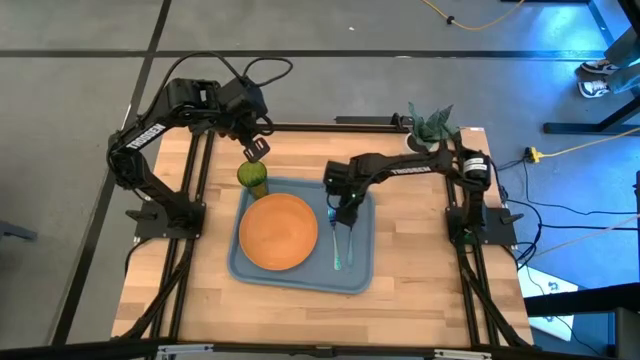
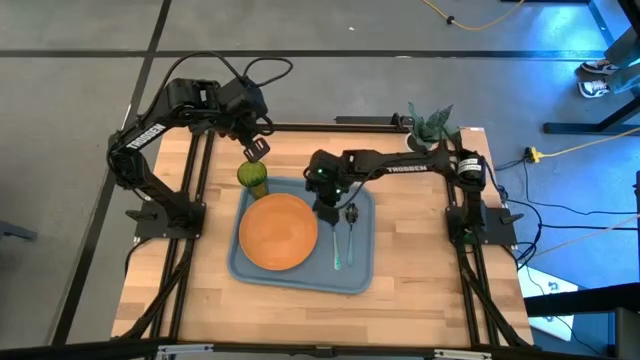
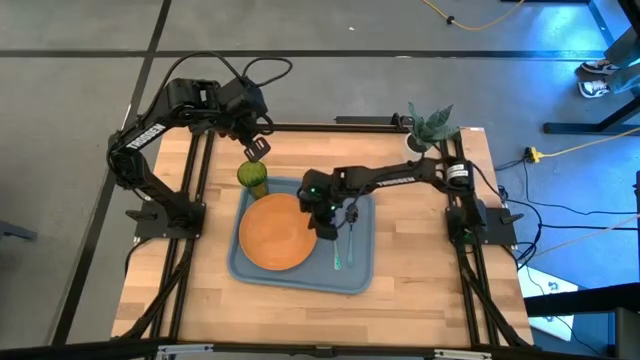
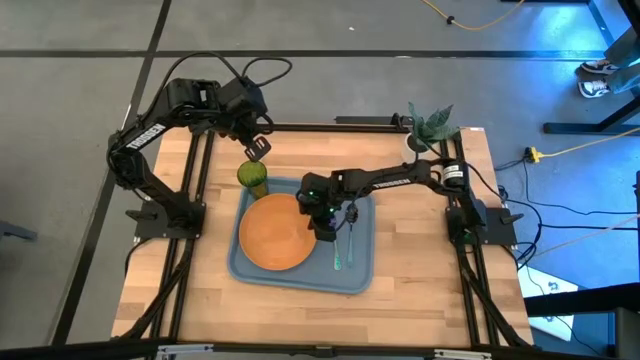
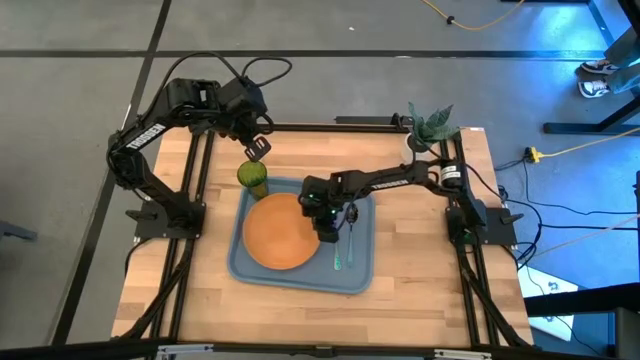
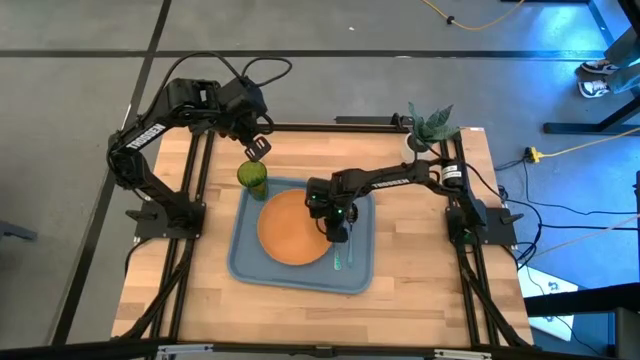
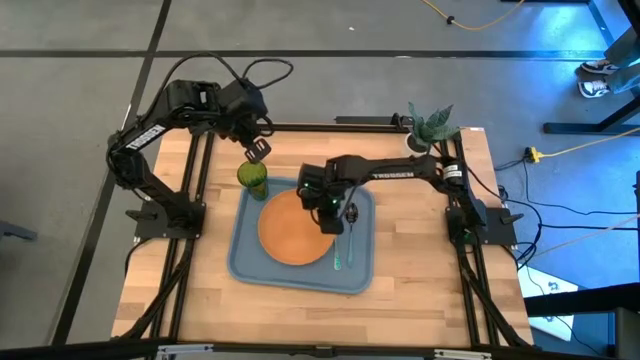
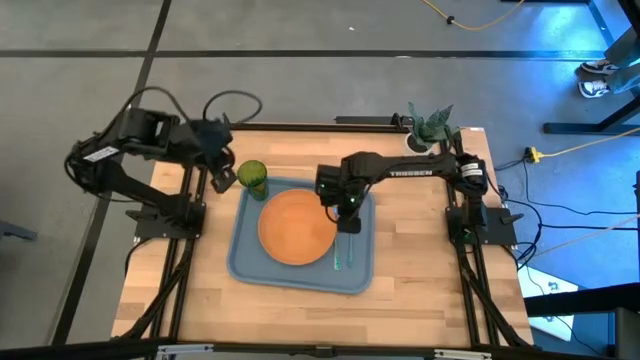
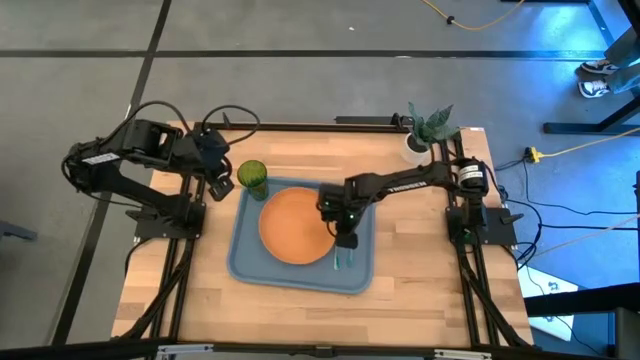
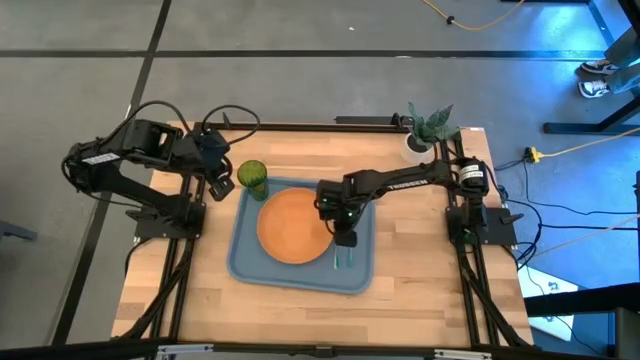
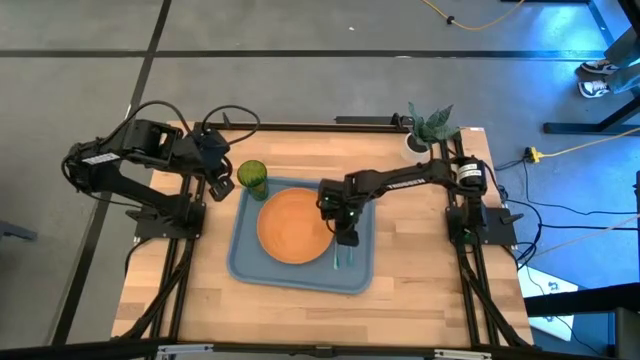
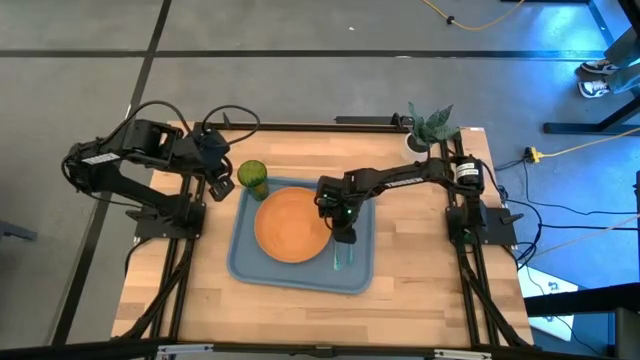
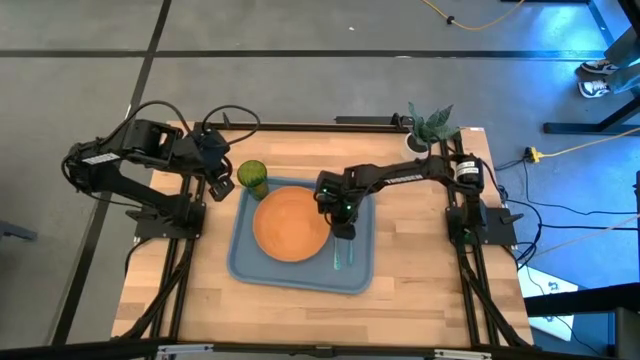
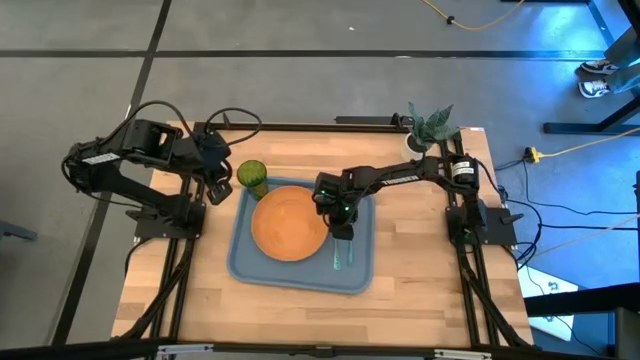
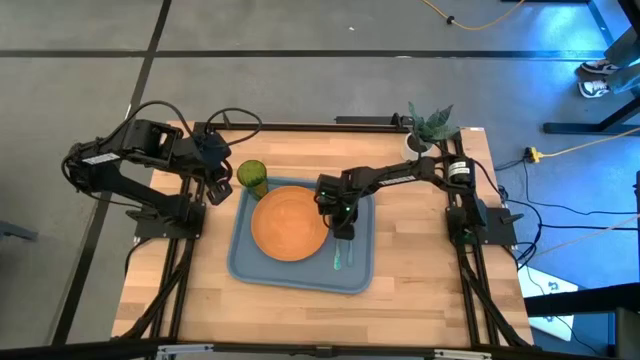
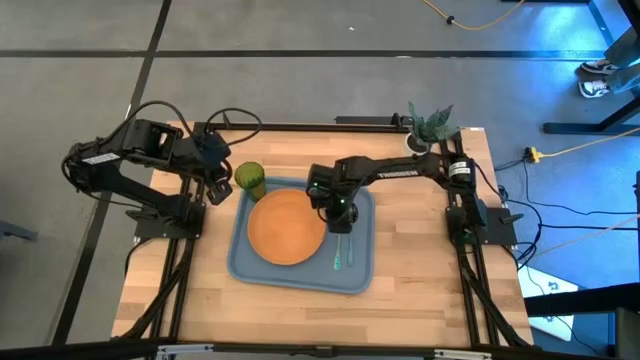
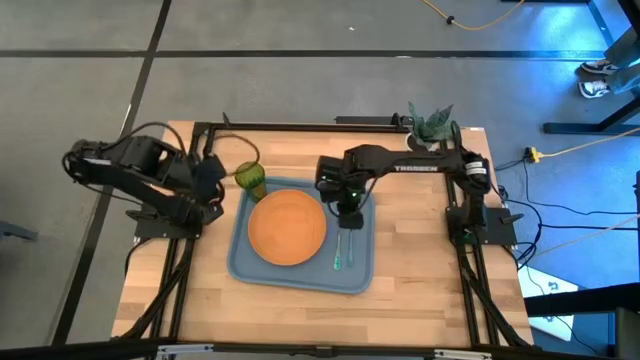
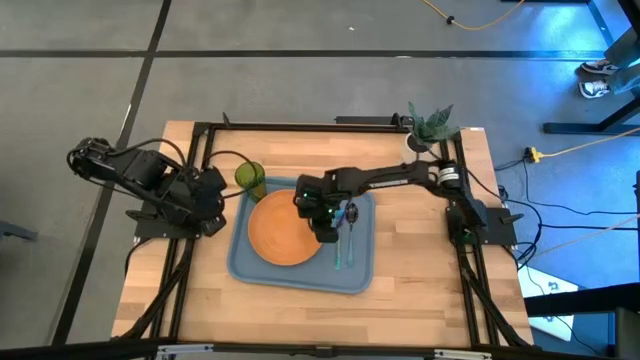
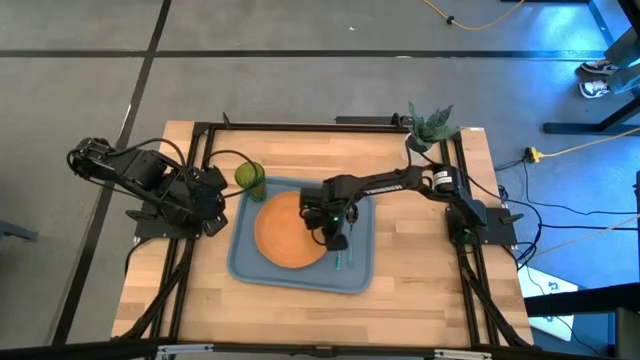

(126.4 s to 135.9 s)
Task: Pick and place plate/cup/fork/spoon on tray
Adjust the orange plate on the blue tray

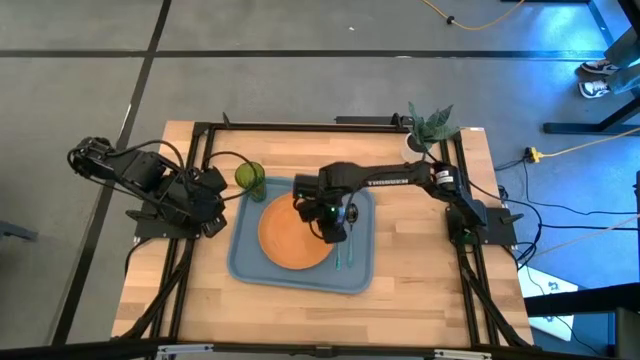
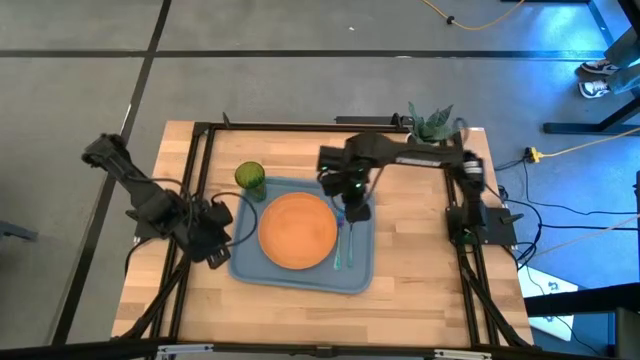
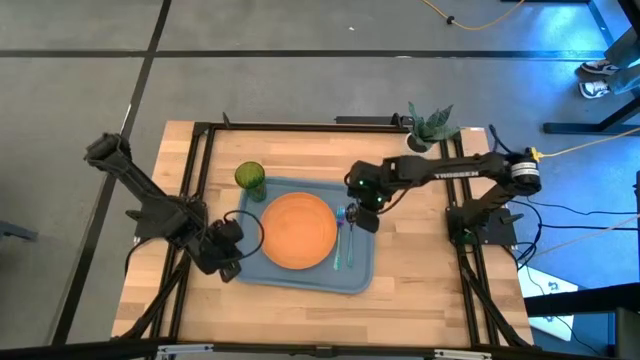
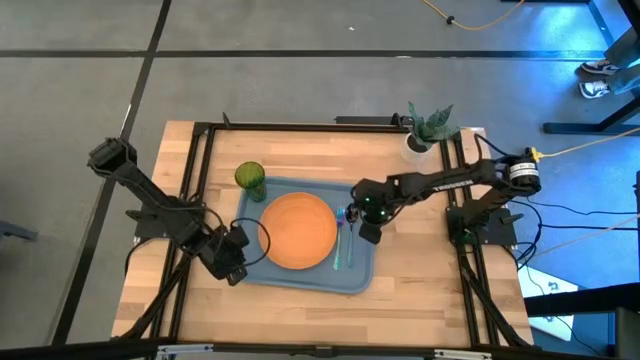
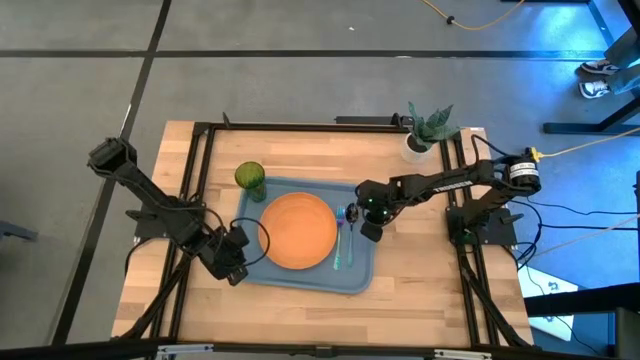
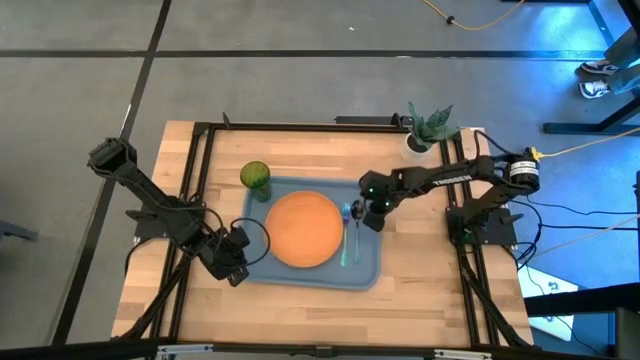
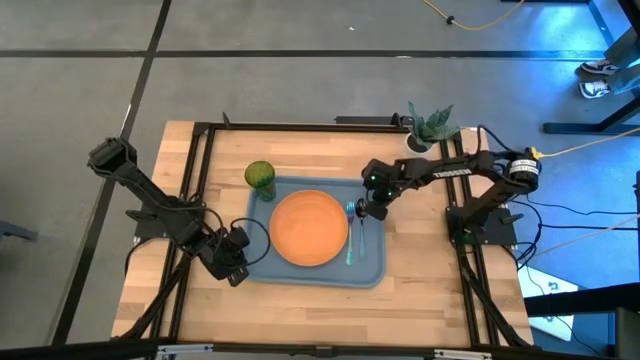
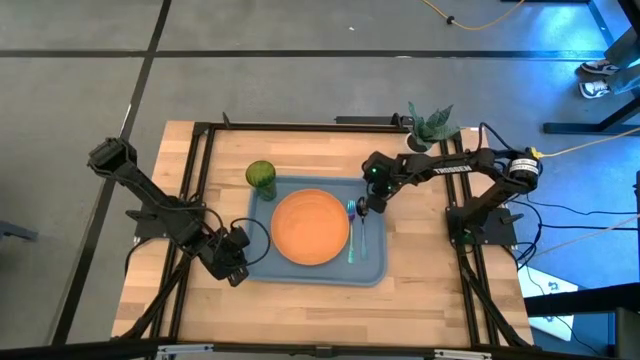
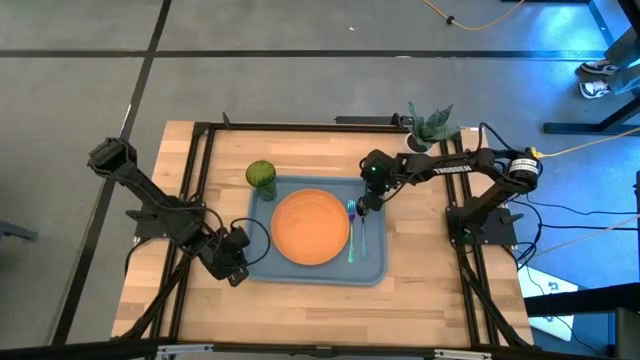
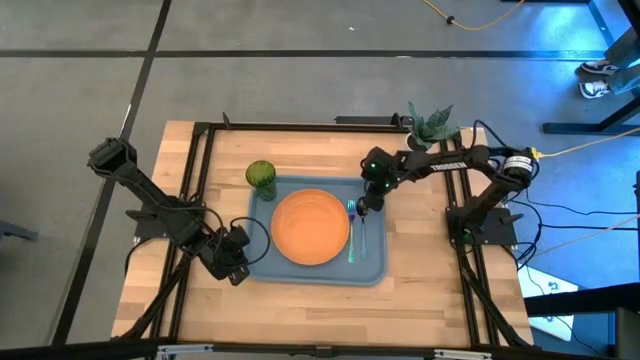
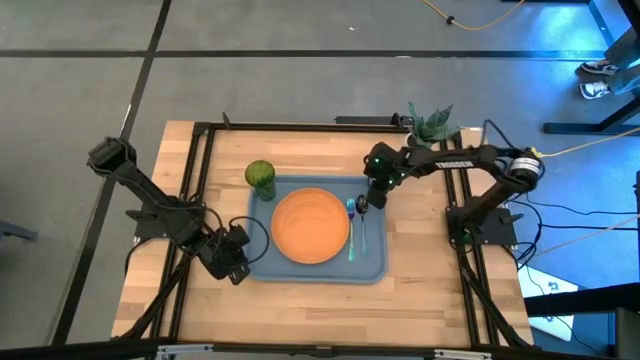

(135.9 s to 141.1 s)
Adjust the blue tray

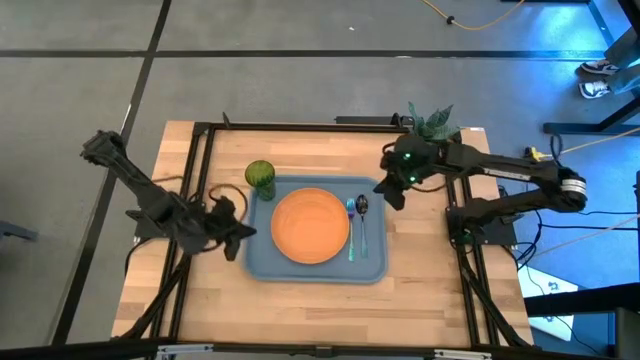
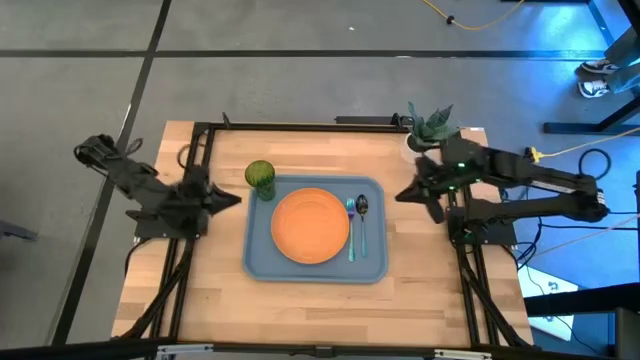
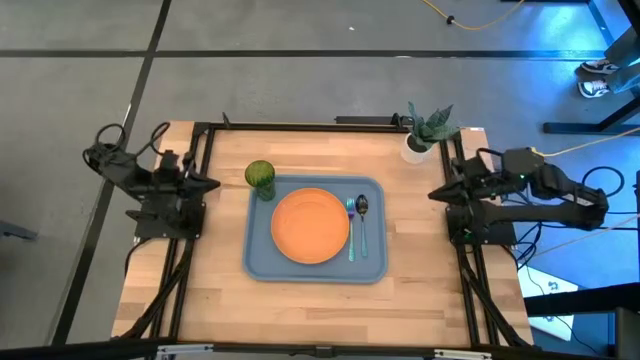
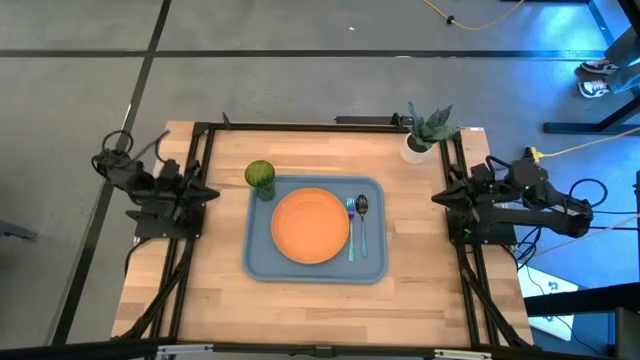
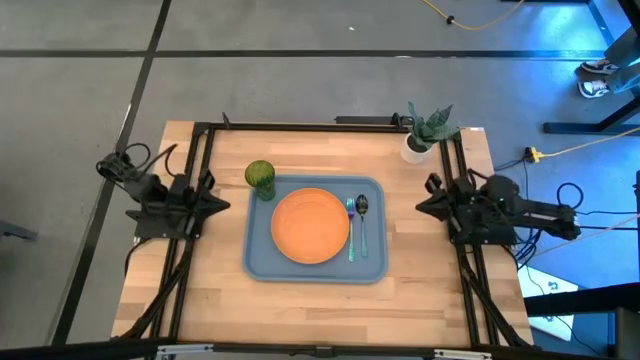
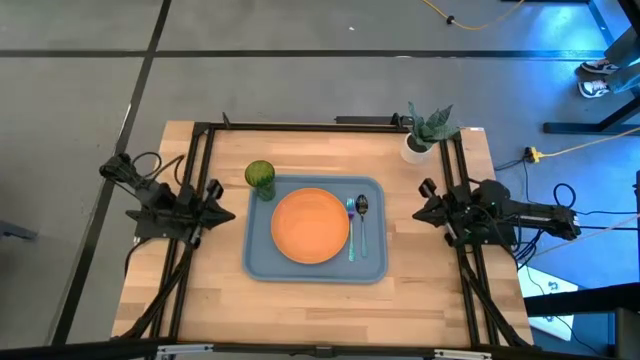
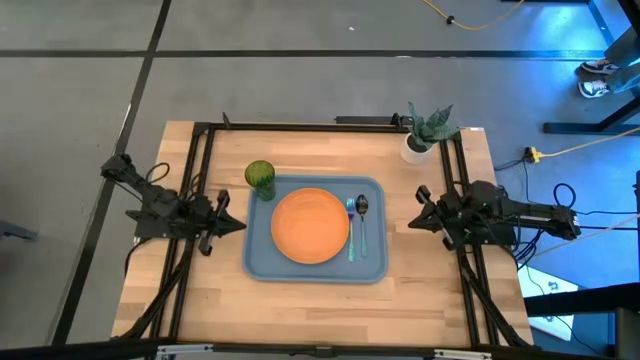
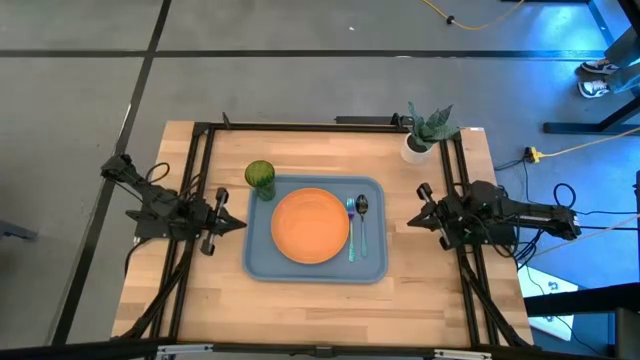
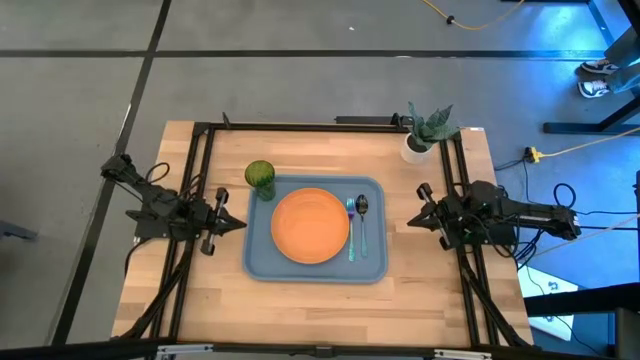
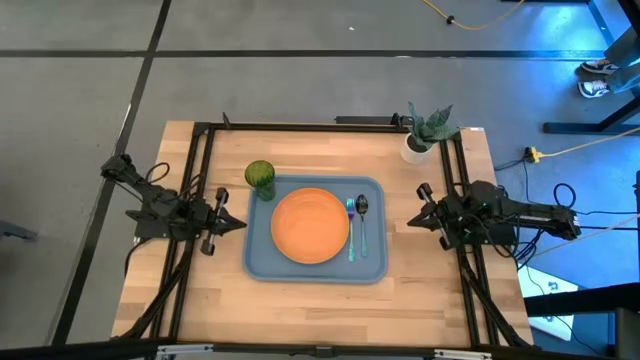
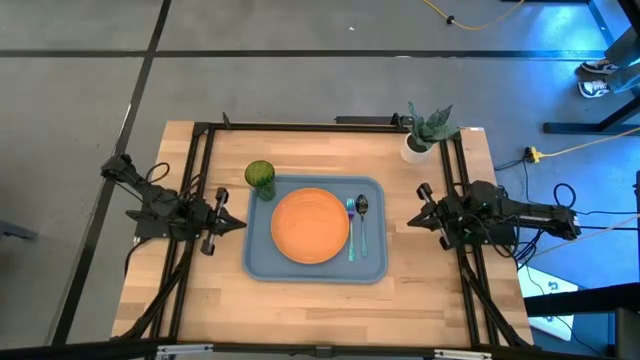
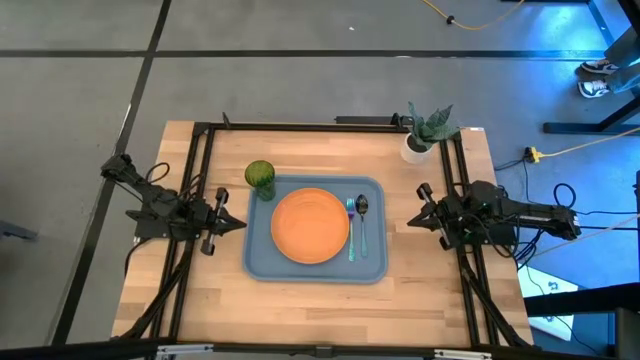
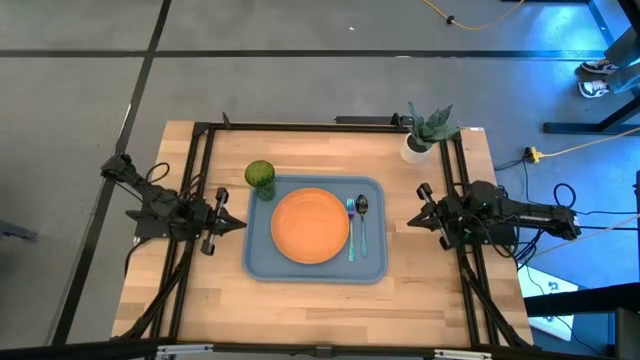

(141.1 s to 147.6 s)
Return to Home Position
